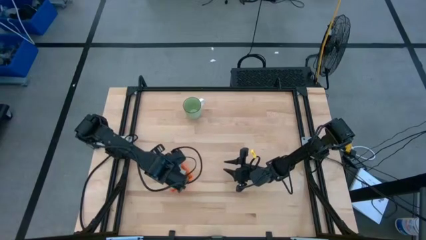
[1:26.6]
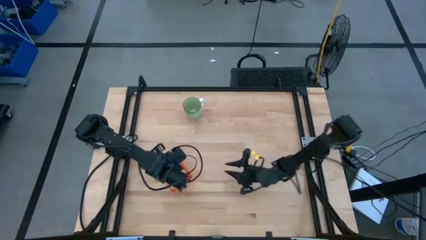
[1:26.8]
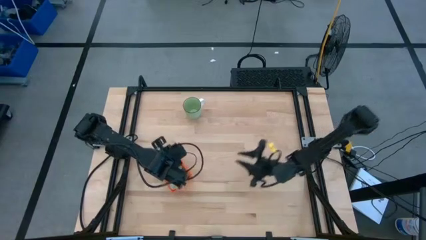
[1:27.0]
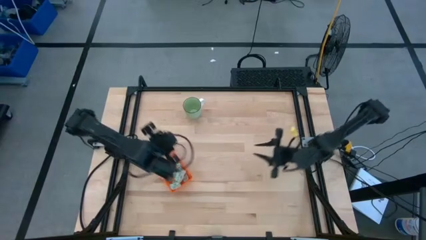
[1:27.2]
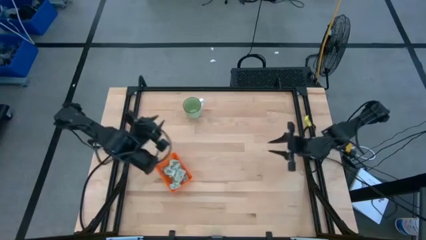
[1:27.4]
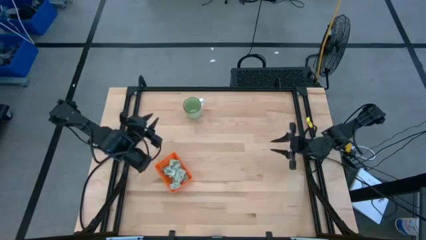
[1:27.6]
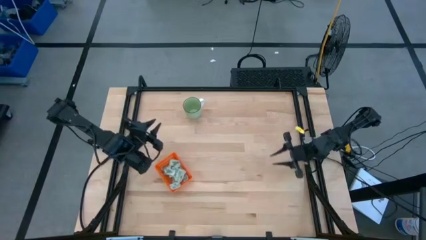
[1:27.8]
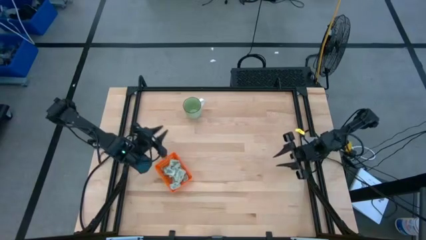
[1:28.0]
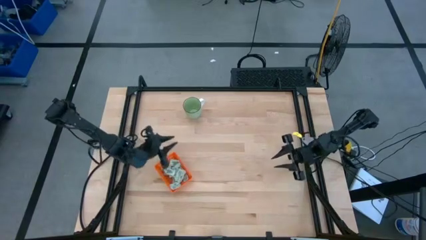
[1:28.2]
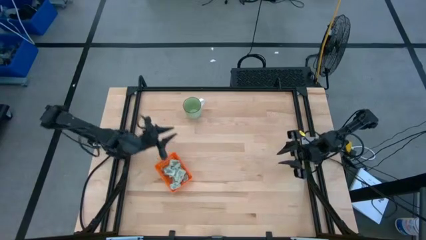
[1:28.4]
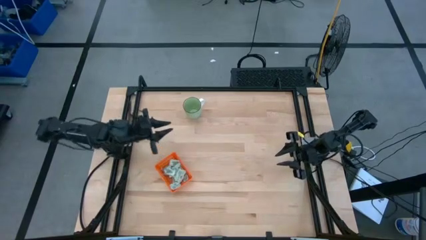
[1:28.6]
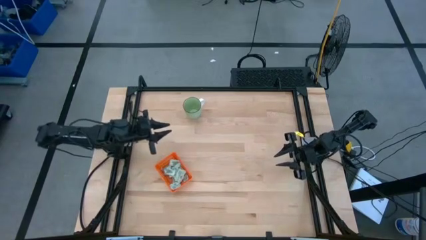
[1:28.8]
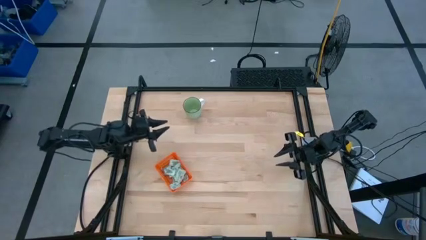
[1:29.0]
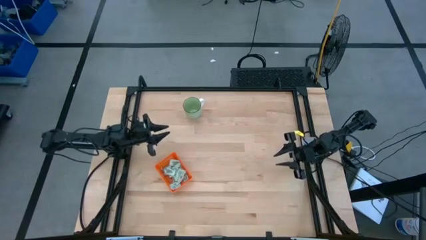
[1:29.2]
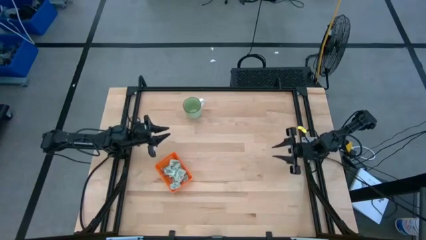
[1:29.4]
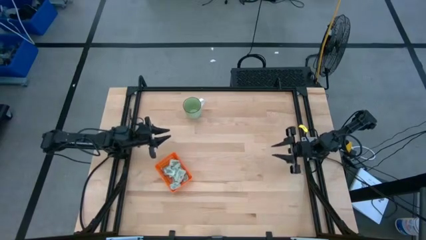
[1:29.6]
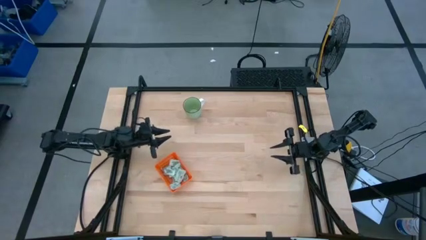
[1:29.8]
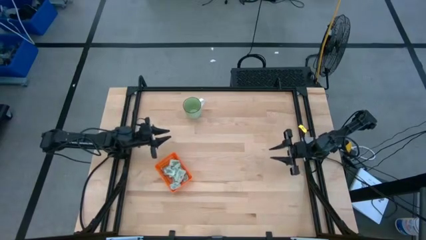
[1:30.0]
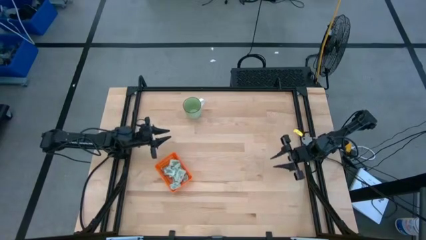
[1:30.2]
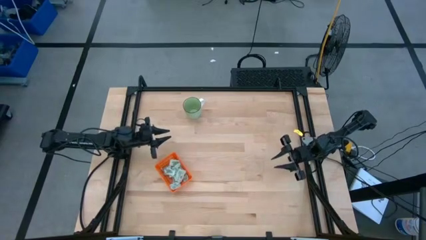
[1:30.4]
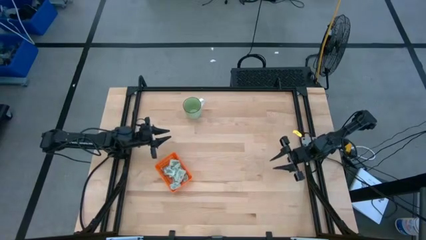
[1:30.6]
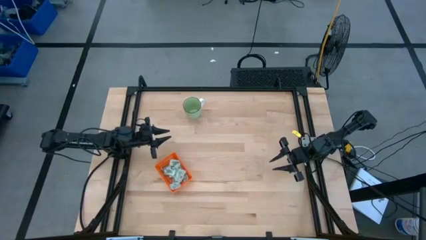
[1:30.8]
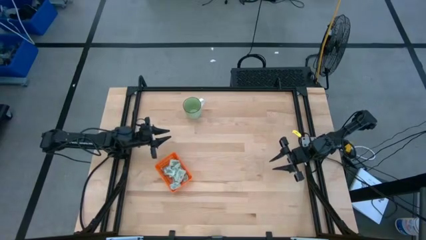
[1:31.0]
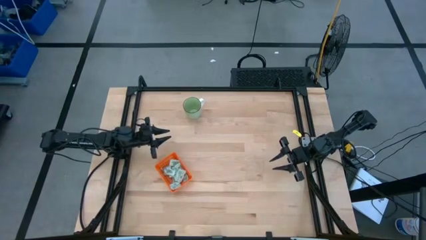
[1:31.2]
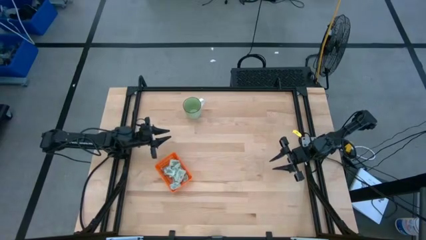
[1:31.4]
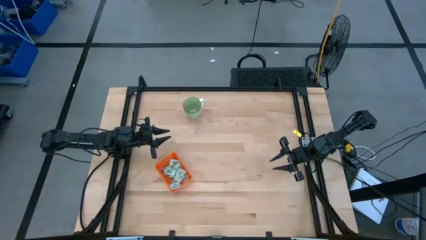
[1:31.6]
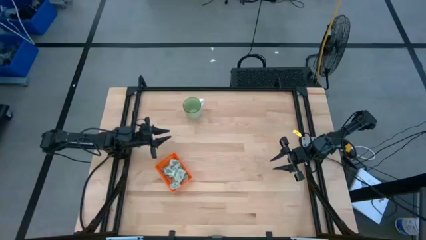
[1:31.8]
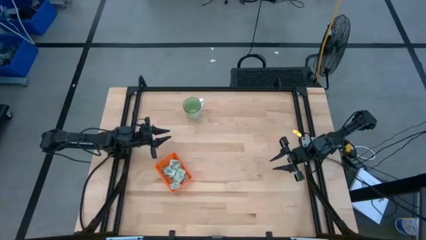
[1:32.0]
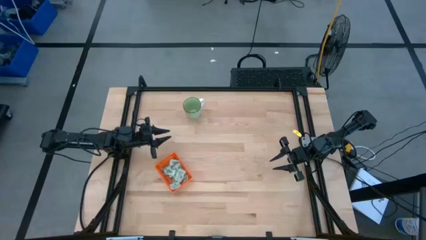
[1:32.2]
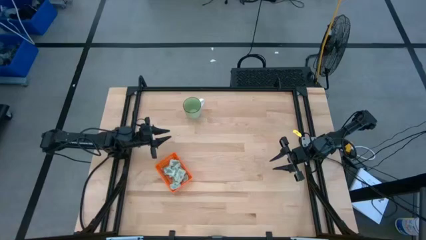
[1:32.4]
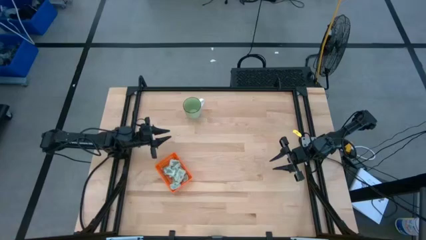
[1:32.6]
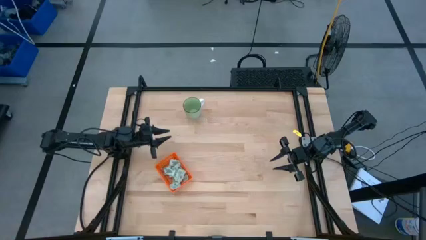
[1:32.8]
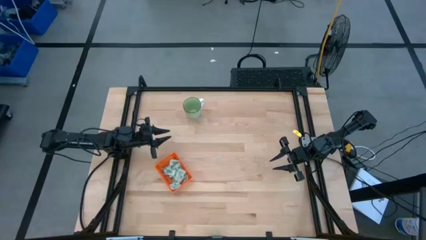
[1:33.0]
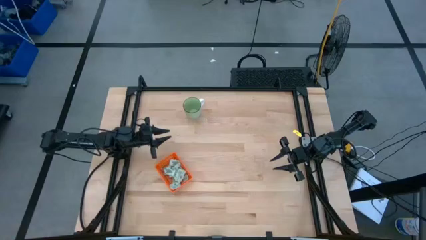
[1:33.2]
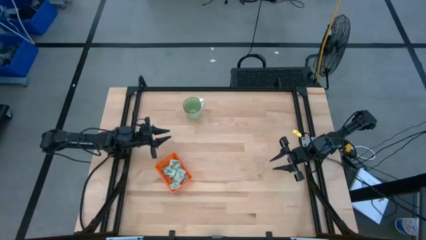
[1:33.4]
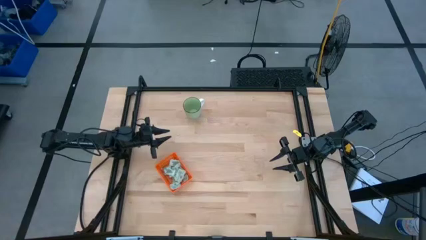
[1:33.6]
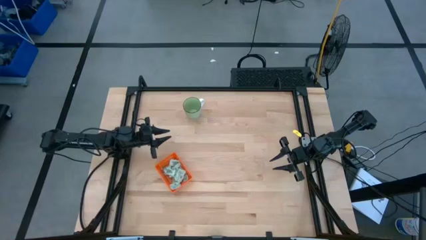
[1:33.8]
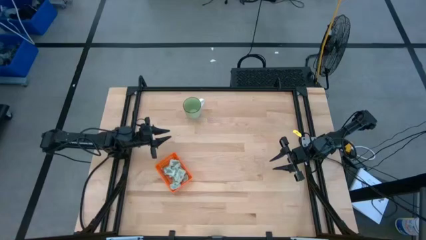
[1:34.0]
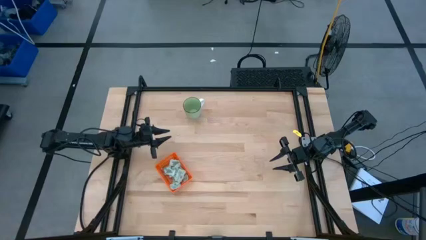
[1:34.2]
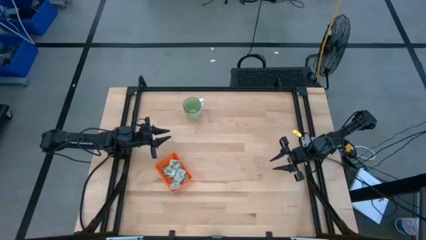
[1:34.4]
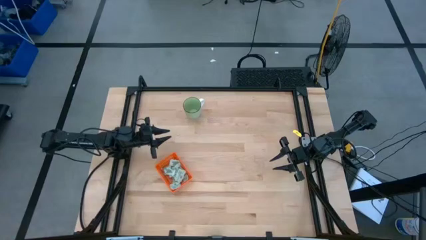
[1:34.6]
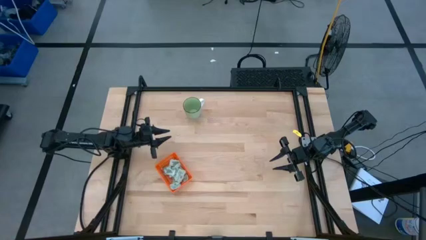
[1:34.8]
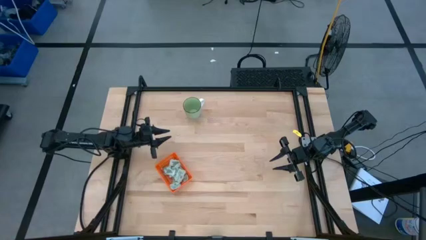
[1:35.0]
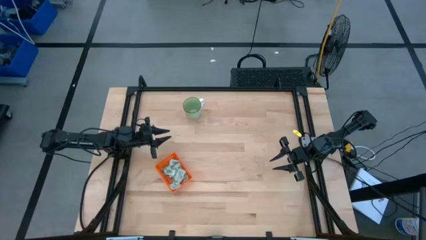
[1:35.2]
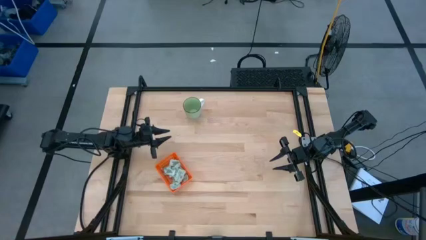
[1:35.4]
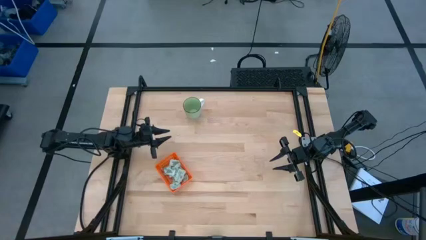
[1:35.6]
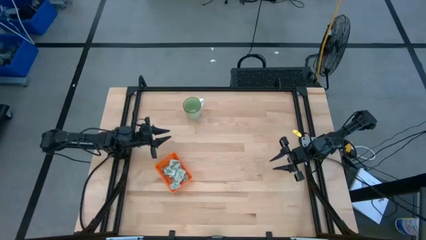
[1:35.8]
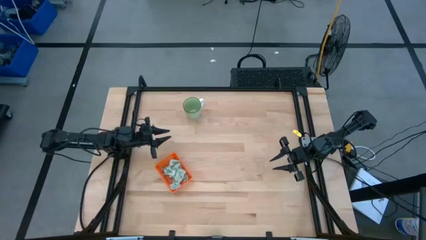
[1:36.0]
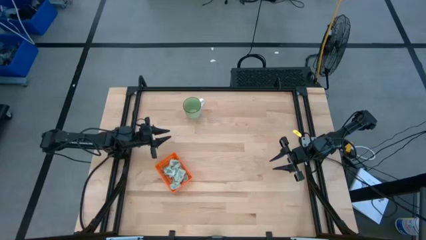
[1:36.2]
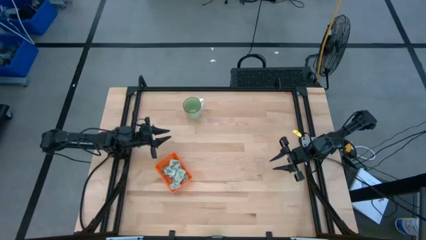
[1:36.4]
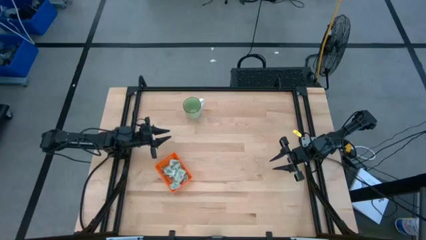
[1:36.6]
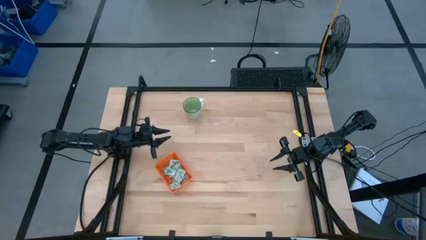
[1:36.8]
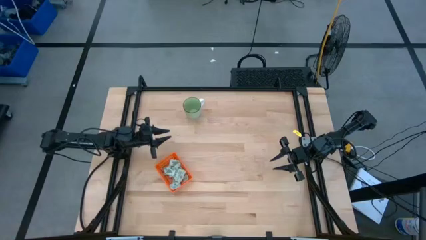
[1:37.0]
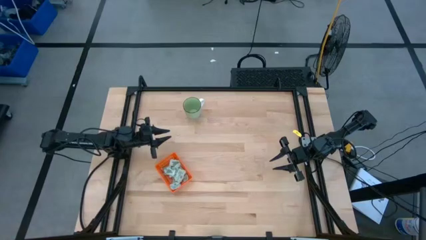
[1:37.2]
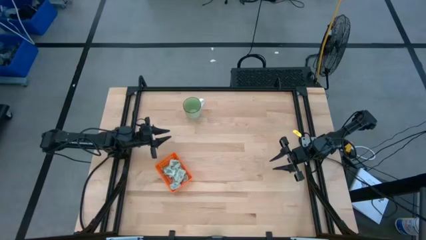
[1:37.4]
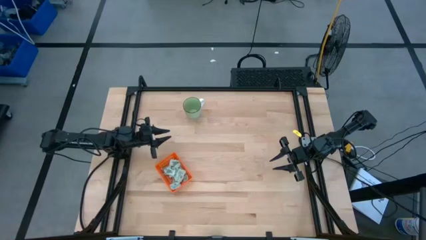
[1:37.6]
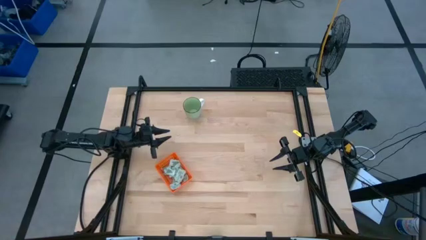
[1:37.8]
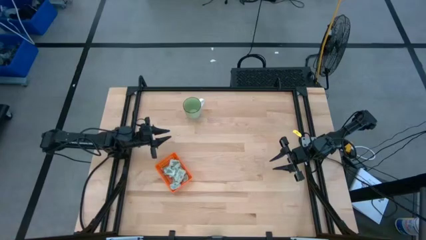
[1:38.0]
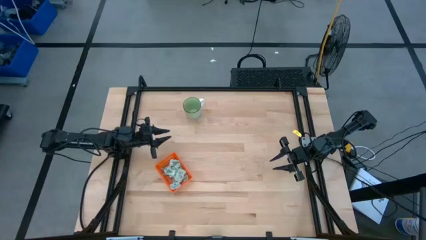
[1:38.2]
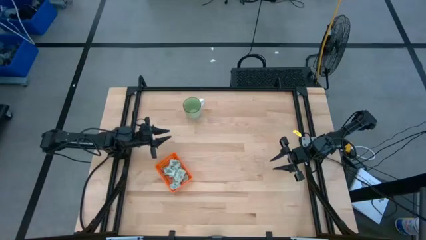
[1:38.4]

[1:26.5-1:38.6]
Task: Pick and place Stevia / Truvia into bins
Return to Home Position

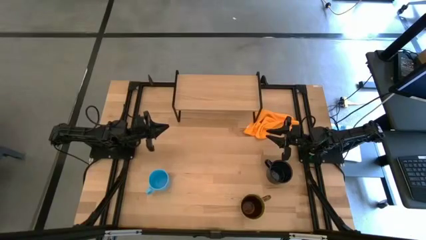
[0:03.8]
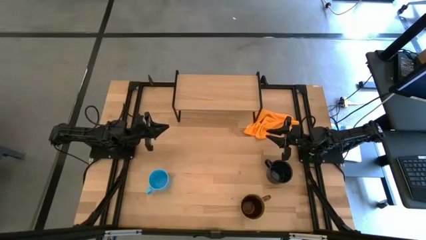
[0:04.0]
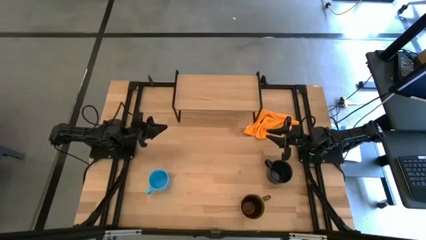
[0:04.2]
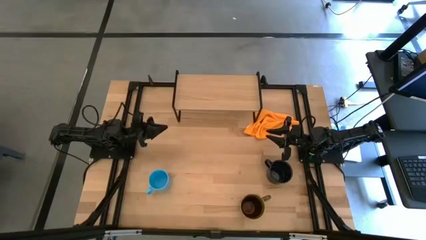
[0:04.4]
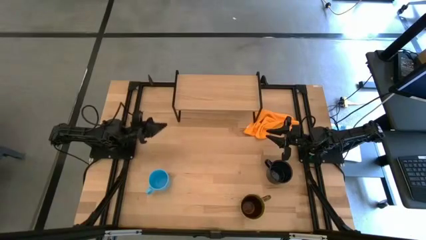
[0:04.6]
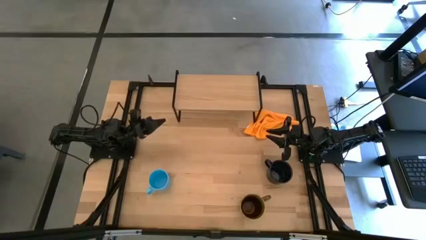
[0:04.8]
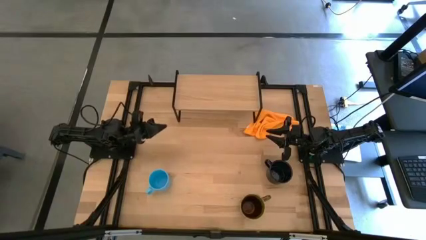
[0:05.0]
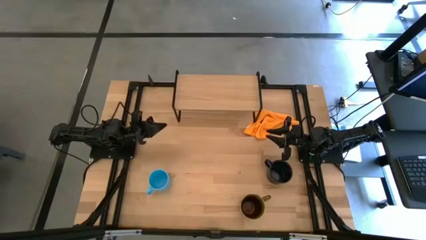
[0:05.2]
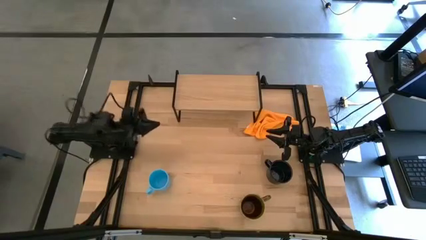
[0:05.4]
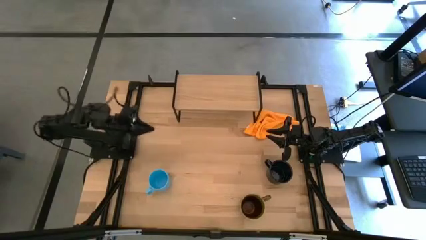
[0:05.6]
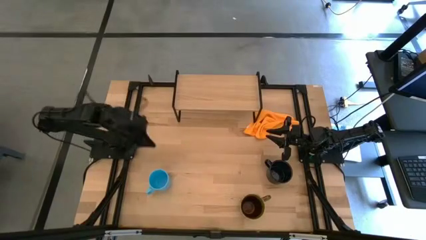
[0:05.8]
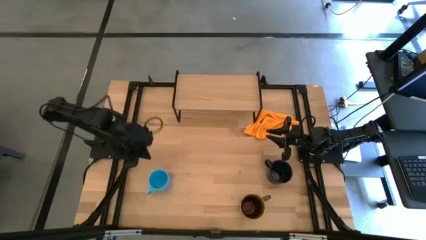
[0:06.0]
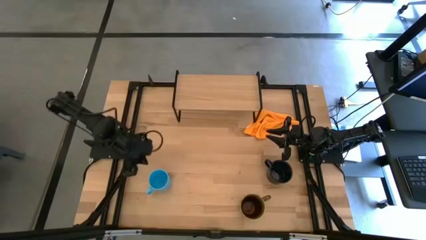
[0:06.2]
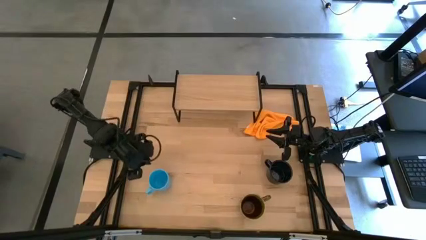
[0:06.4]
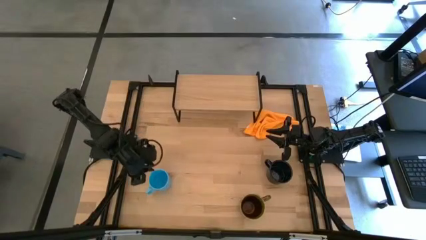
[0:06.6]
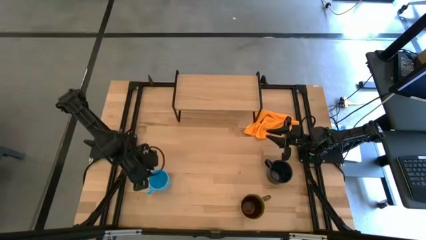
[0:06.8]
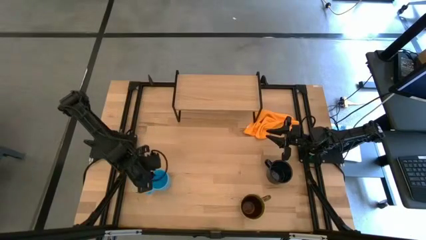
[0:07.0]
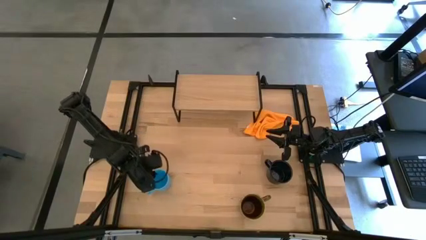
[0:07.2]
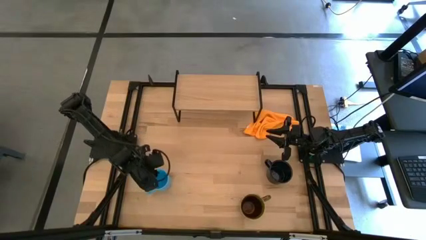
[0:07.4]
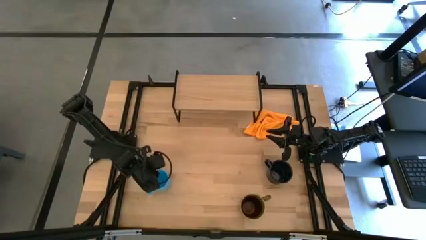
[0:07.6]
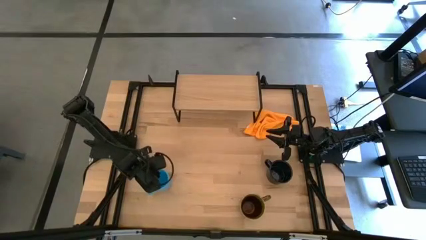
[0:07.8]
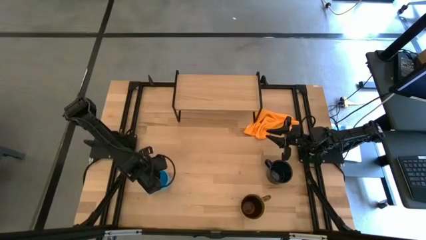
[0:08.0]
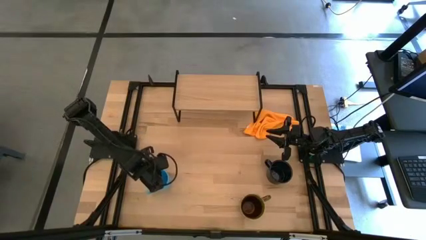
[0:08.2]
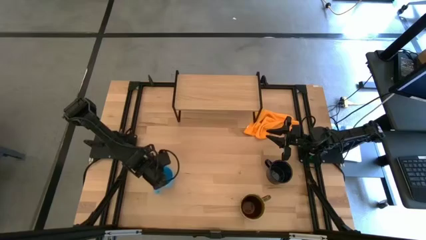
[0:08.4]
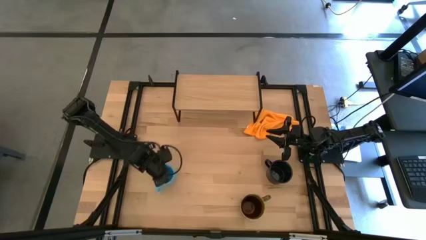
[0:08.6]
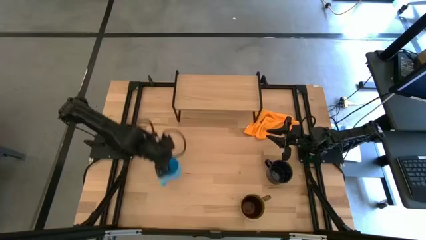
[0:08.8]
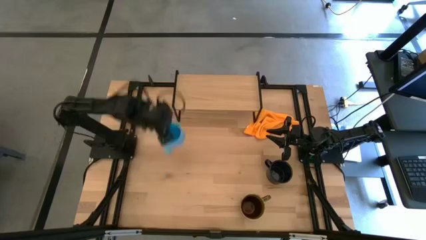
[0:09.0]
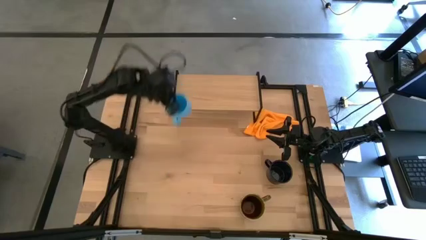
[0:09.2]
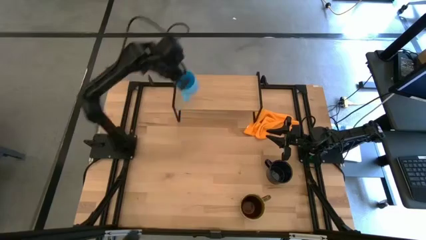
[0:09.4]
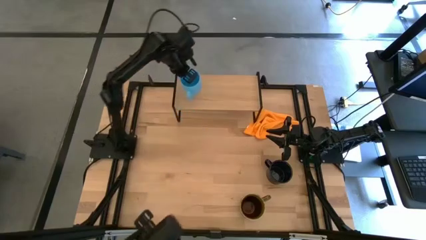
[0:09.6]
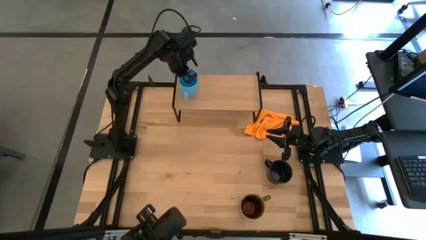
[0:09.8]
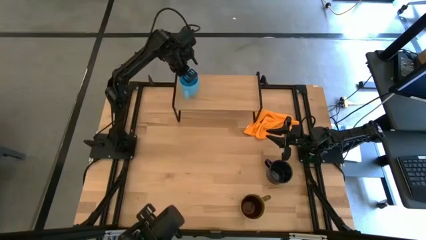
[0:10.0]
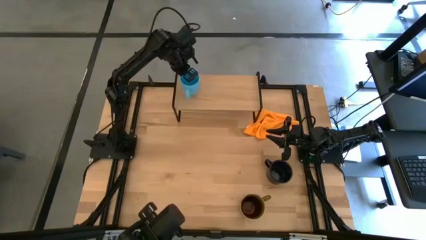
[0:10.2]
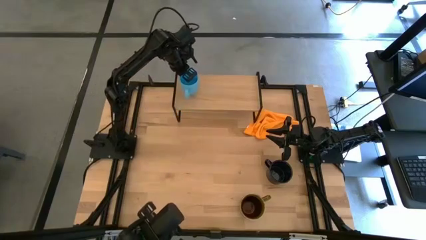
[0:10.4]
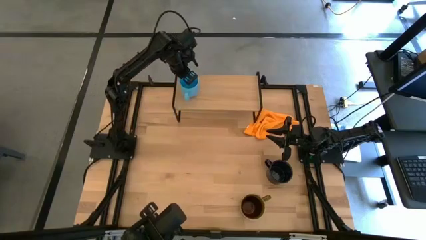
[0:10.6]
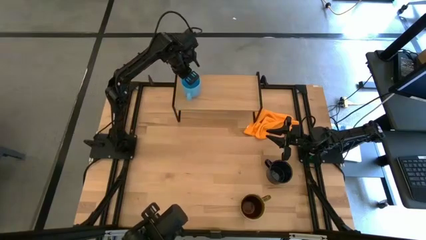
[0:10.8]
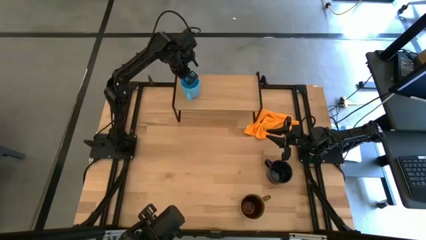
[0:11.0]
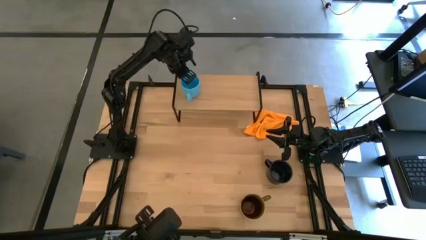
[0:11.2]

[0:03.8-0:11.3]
Task: Stack small to large cups/mugs on shelf
Put the light blue mug on the shelf
